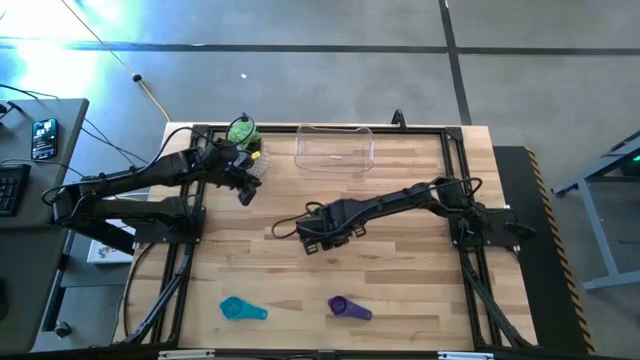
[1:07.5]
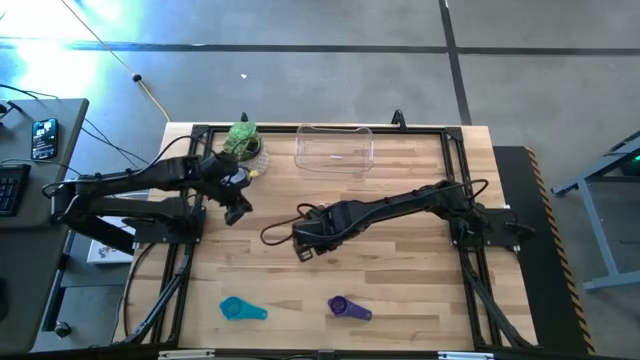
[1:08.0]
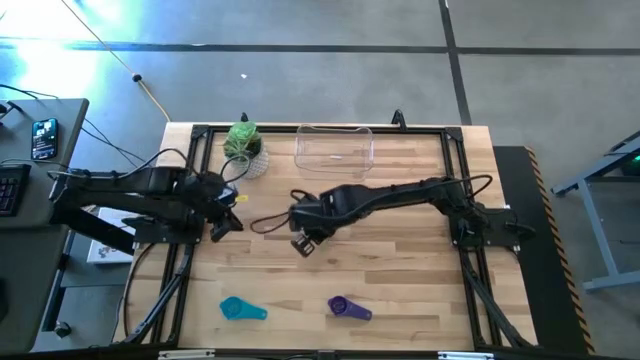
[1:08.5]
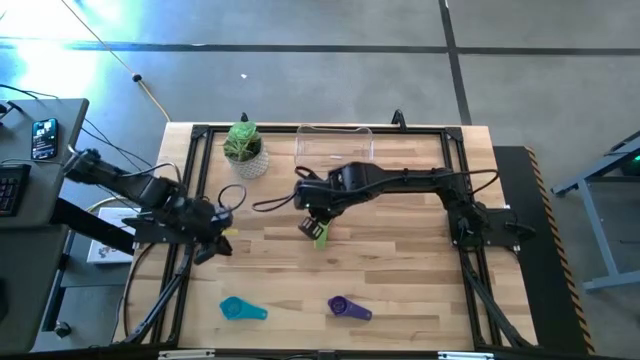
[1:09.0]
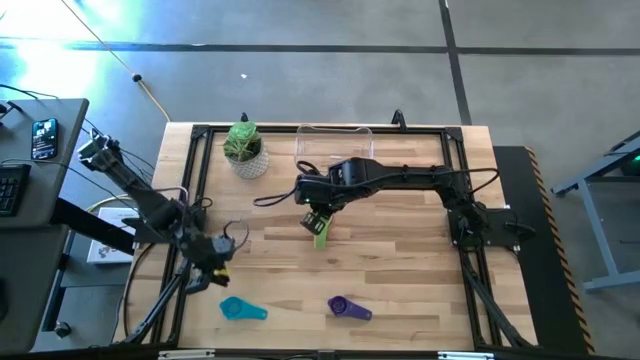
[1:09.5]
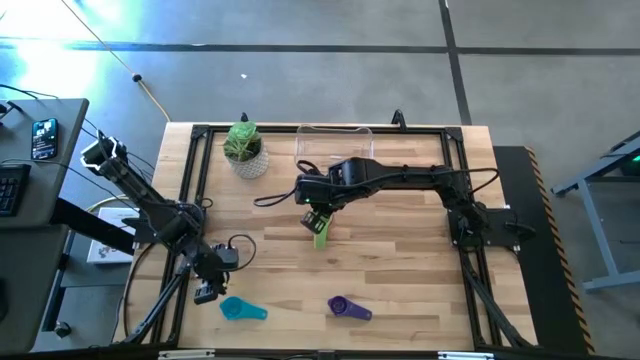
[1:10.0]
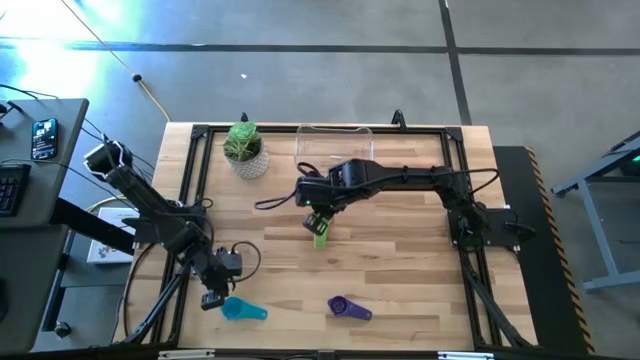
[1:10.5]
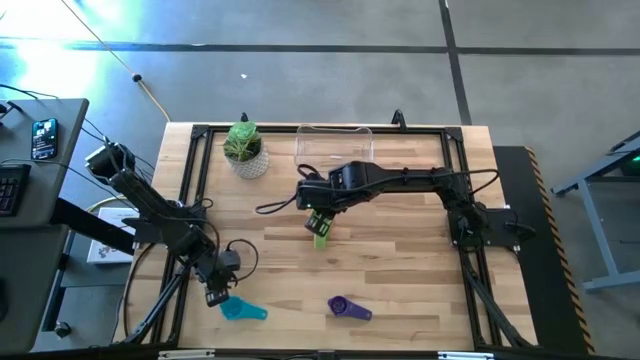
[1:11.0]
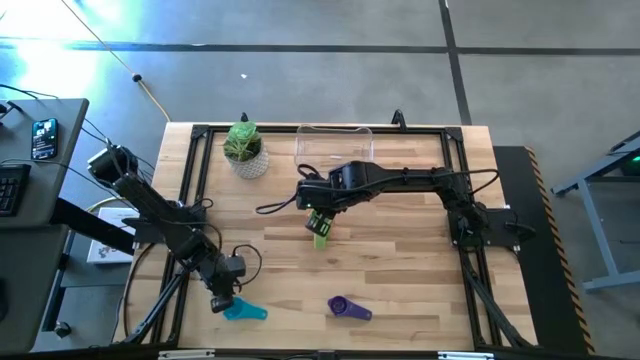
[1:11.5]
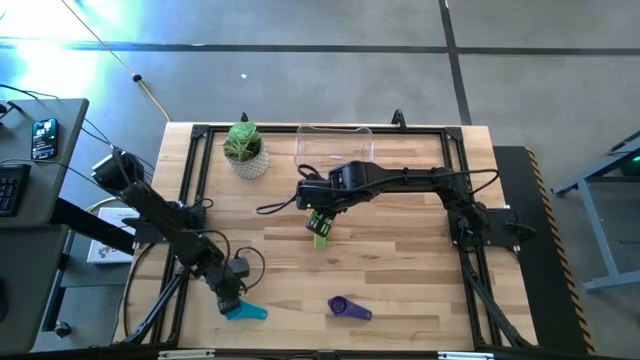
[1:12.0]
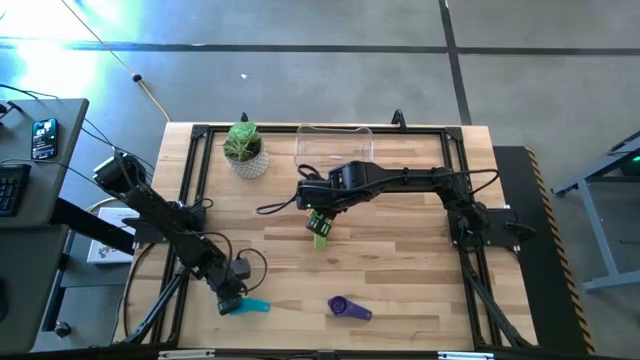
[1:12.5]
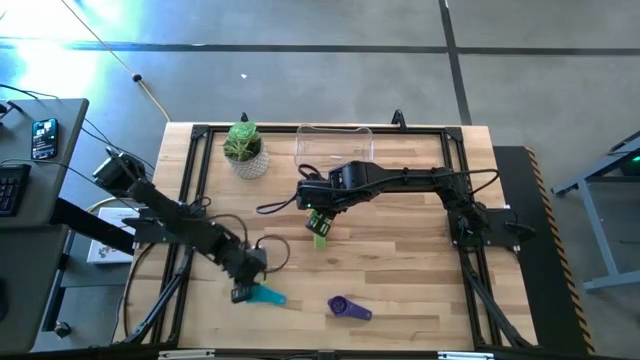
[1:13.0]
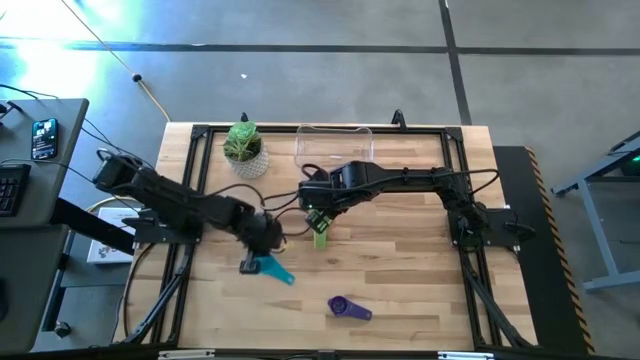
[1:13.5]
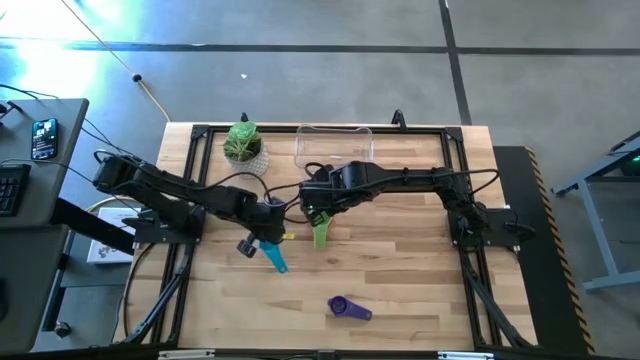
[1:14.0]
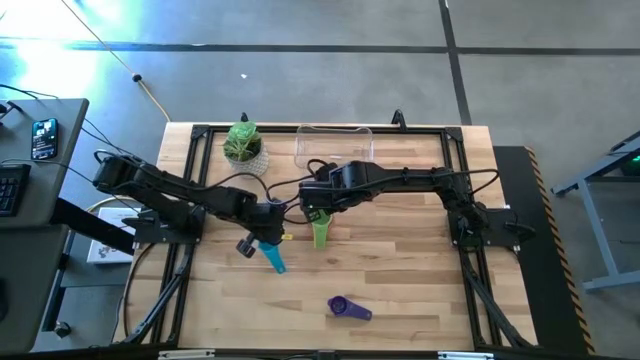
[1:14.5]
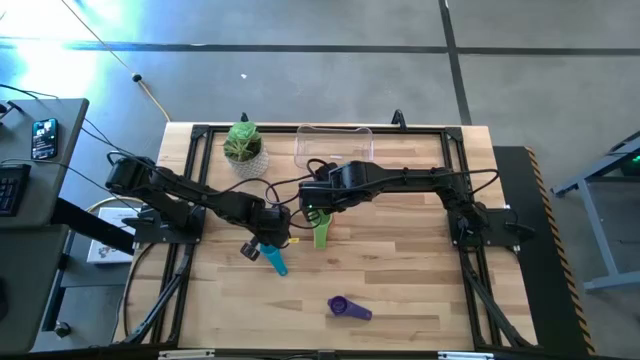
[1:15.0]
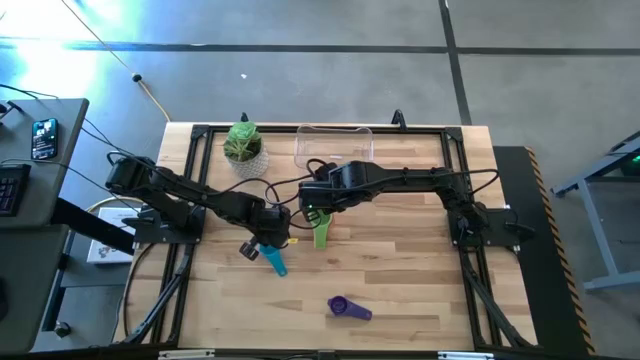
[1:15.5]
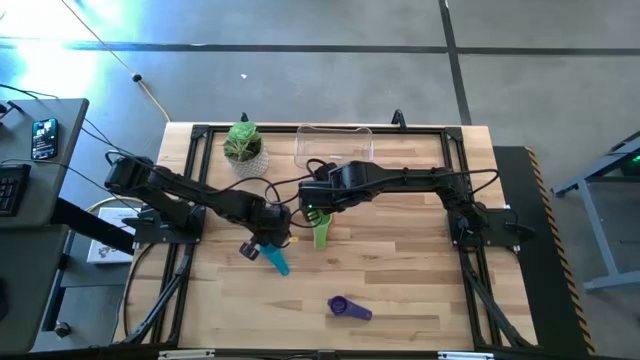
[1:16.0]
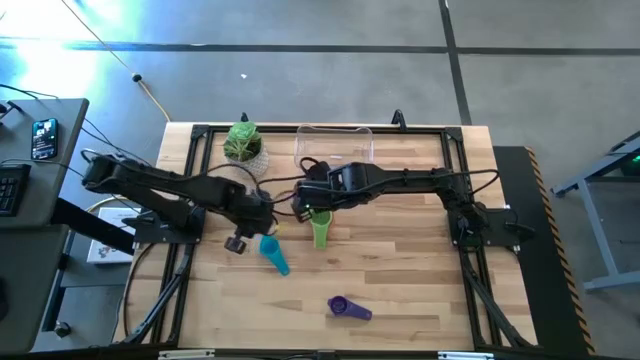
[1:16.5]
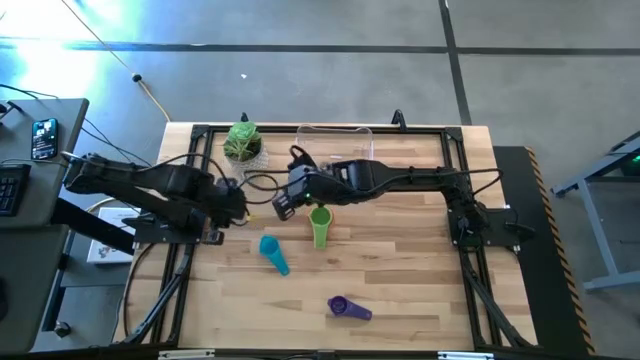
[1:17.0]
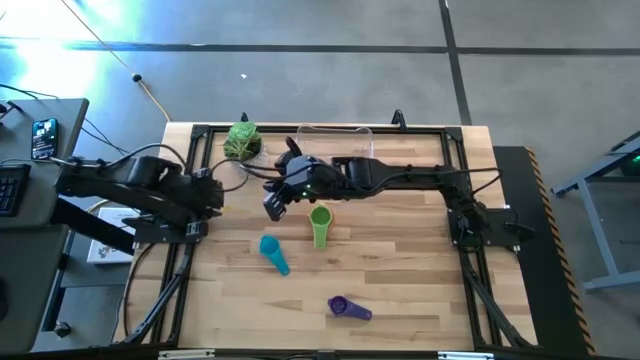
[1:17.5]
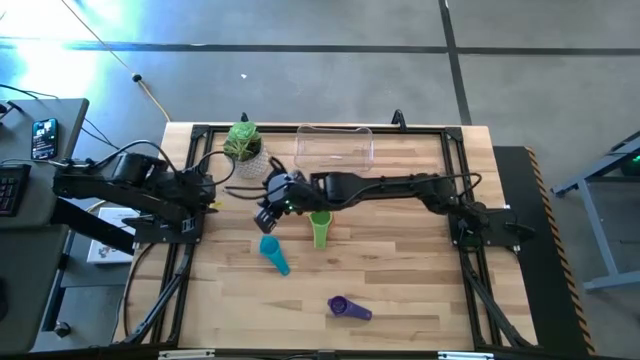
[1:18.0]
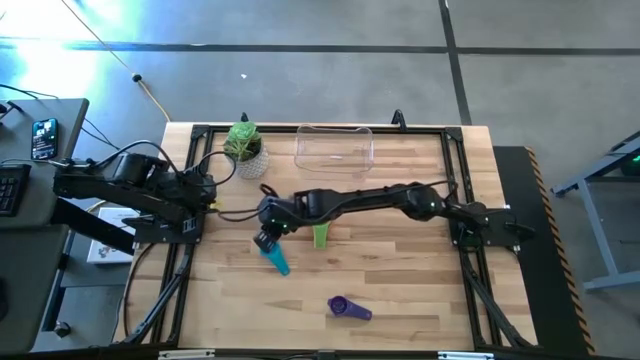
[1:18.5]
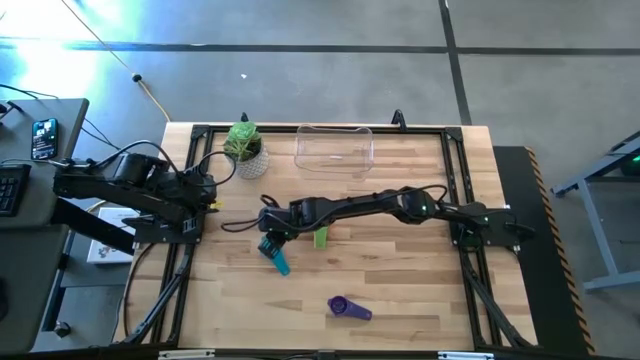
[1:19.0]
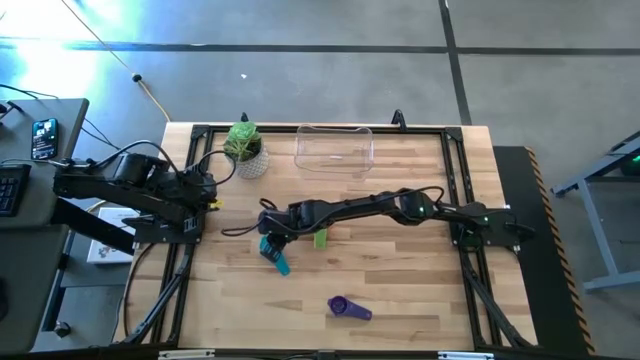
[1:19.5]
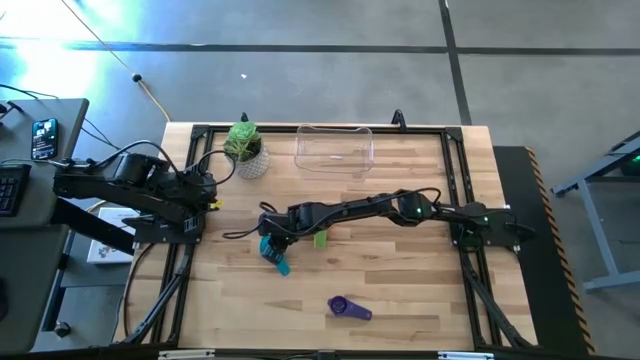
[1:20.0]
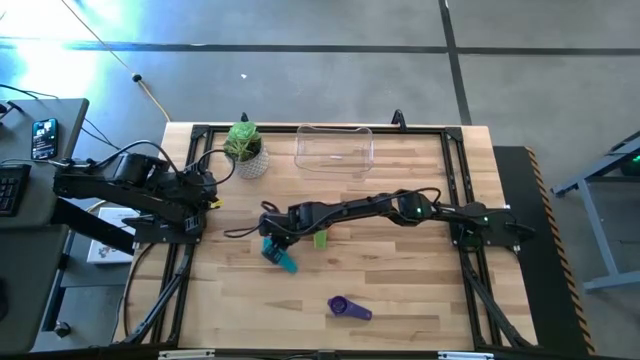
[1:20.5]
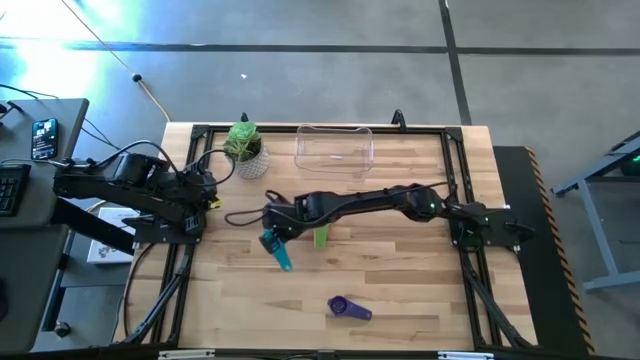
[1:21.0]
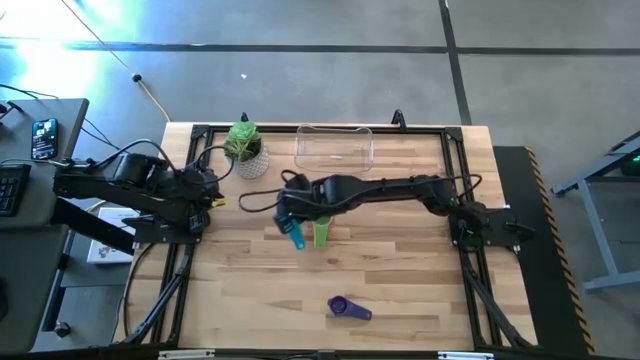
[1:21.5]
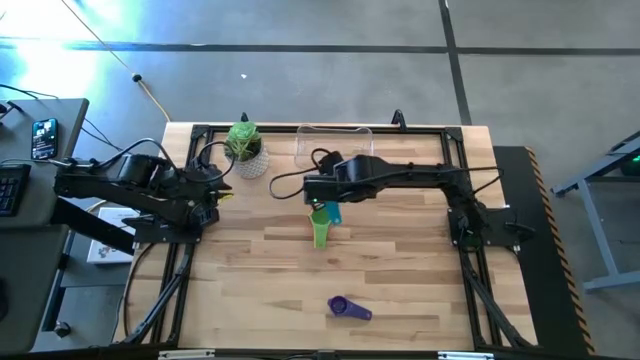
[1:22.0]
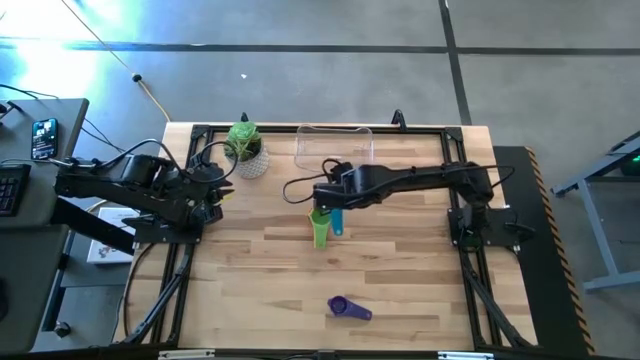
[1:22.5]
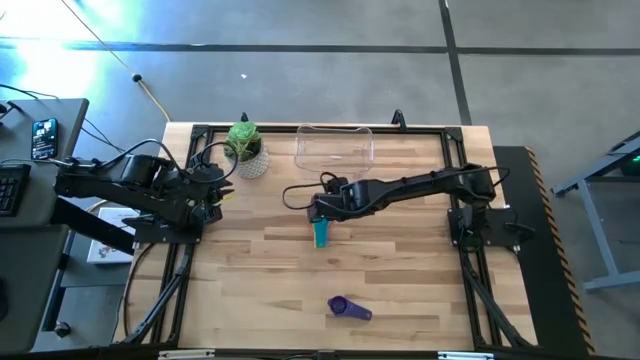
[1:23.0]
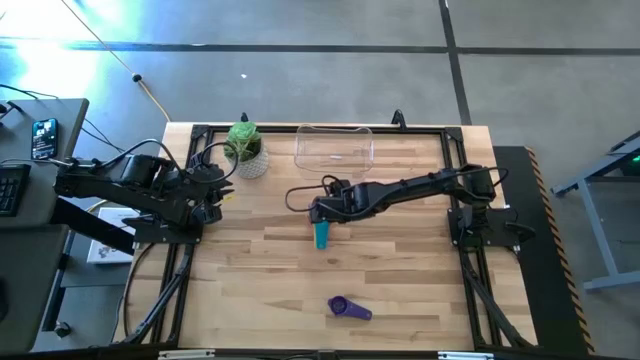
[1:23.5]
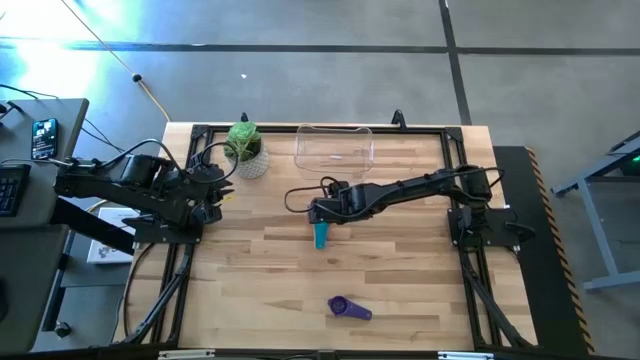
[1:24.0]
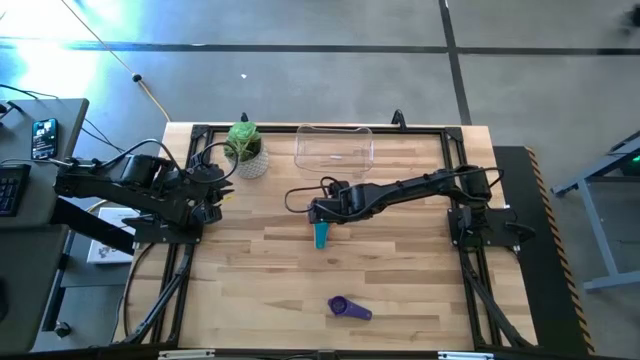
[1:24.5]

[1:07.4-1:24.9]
Task: Nest measuring cups in basket
Stack the blue measuring cup on top of the green measuring cup

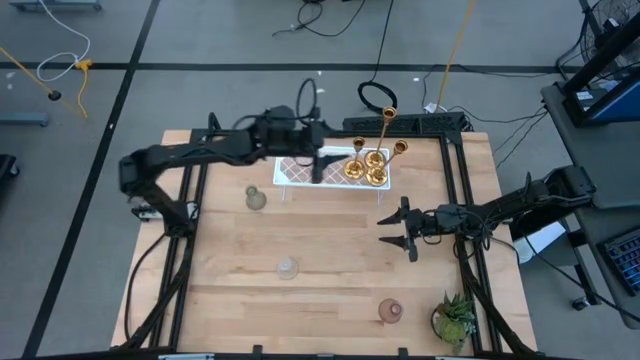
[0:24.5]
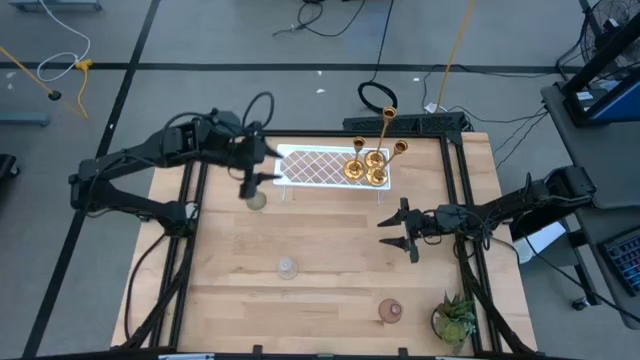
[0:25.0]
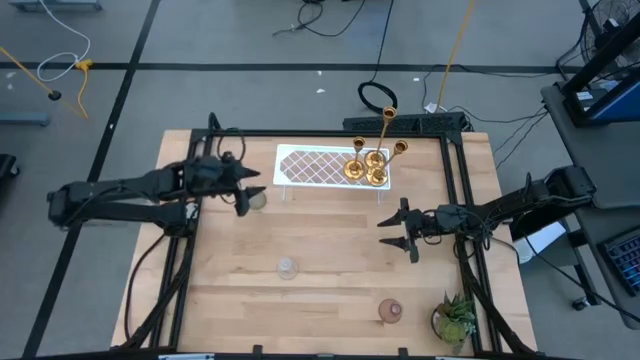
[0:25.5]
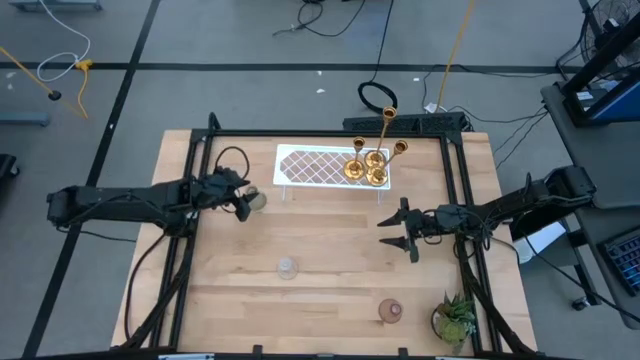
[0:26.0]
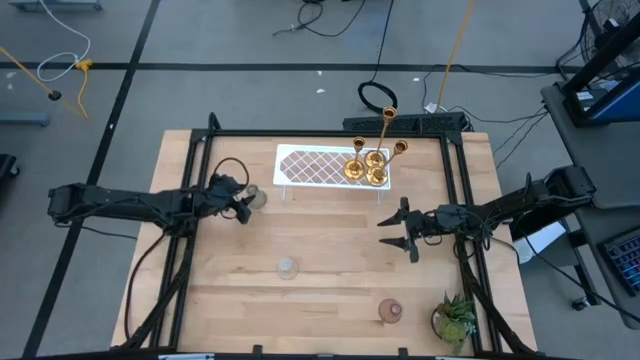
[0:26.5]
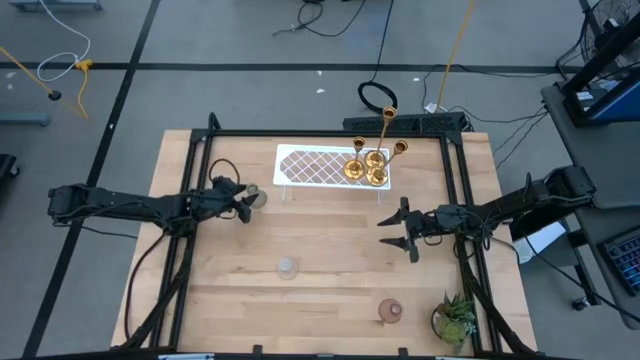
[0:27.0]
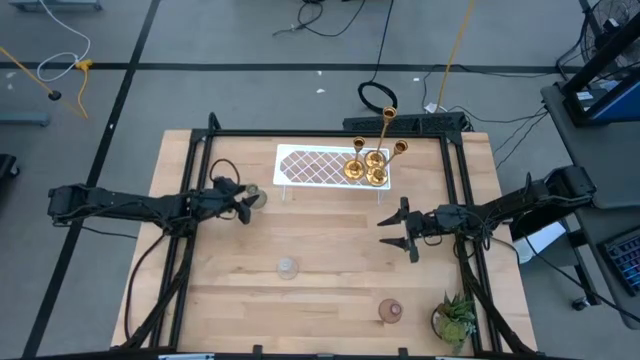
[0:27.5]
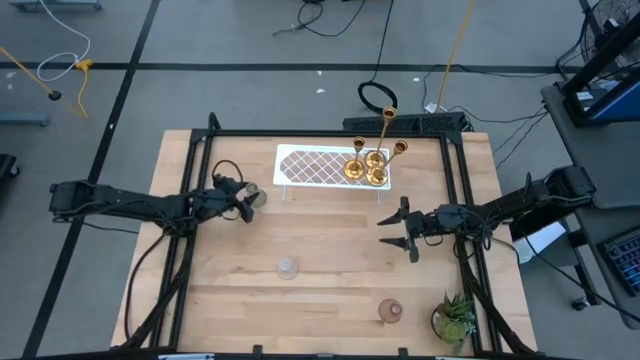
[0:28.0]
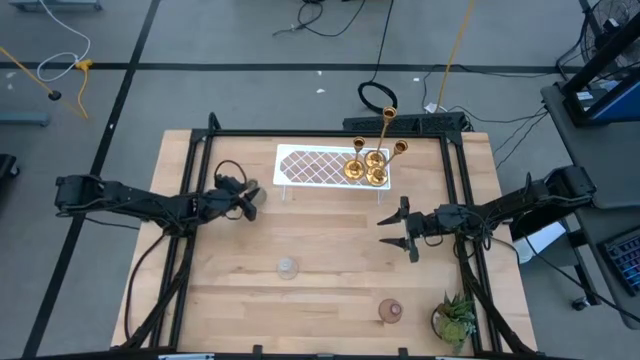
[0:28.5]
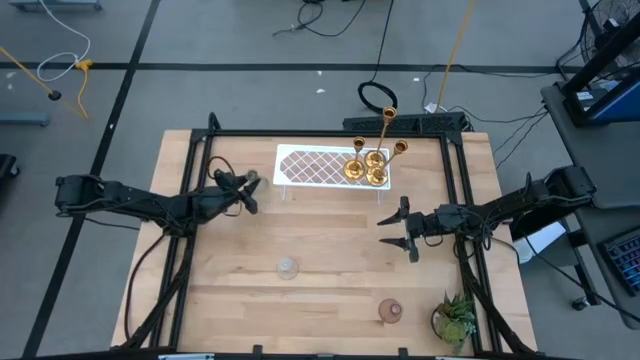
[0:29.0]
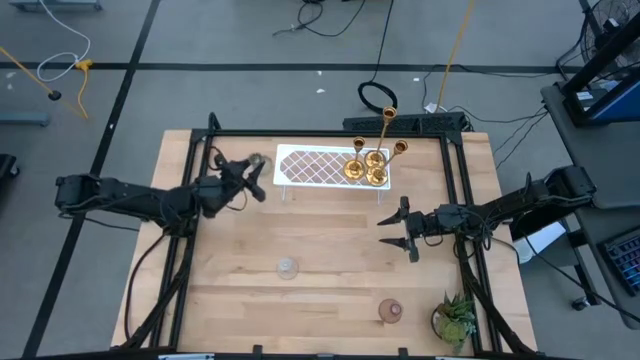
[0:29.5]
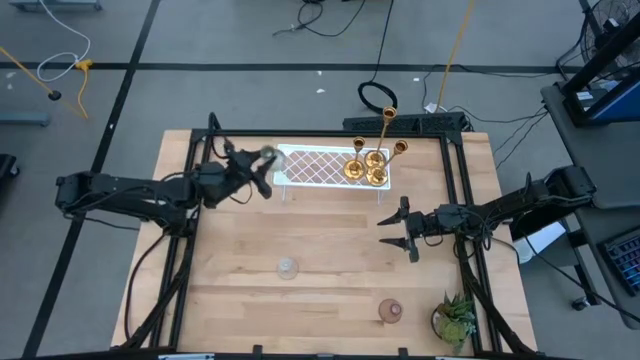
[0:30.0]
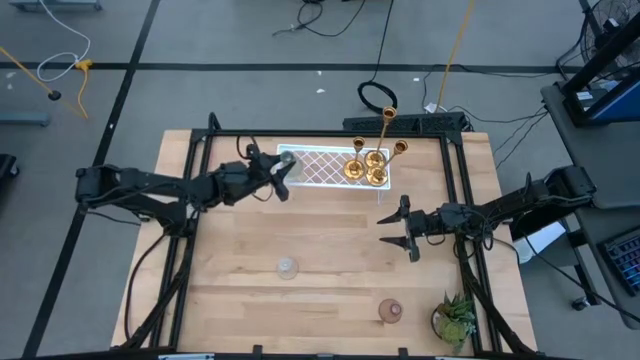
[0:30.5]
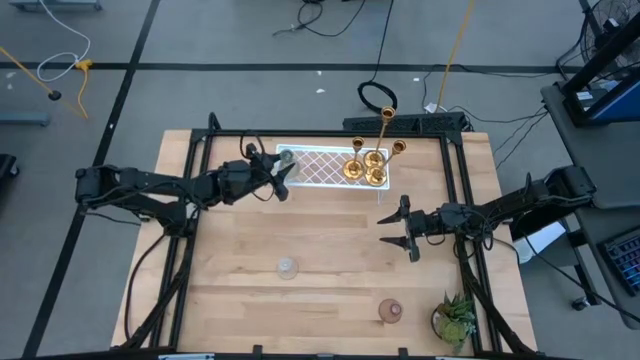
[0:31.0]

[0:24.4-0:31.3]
Task: Pick & Place candle stick holders
Put the green candle holder on the shelf
